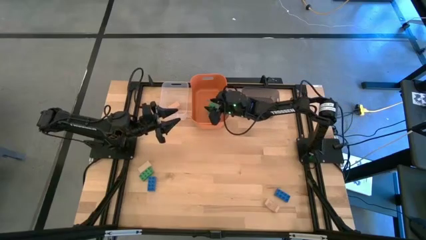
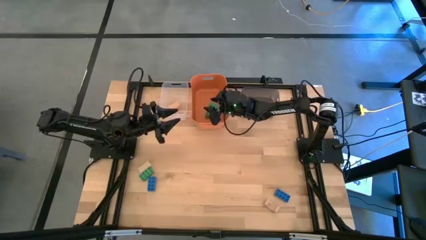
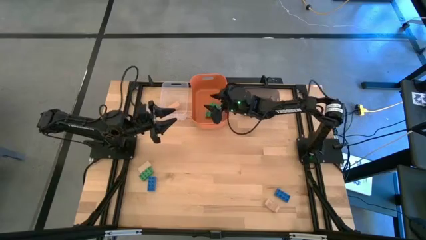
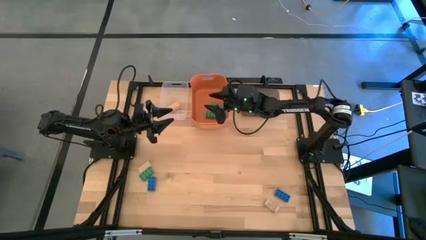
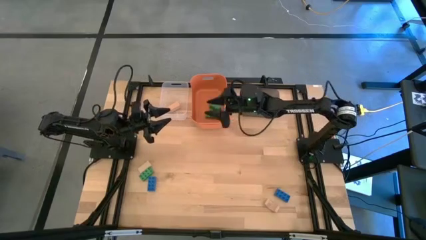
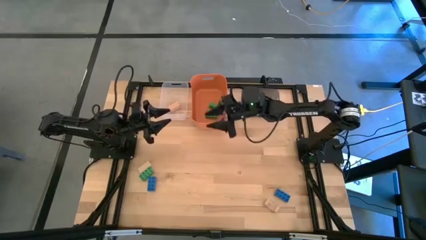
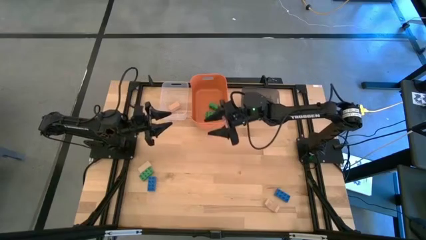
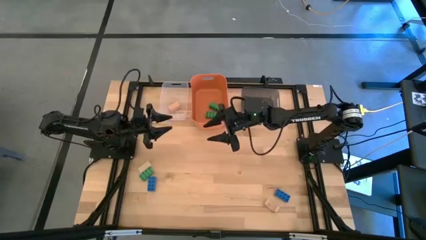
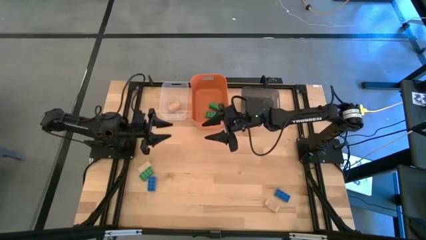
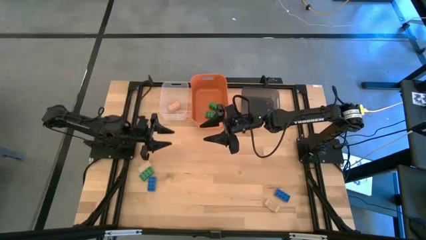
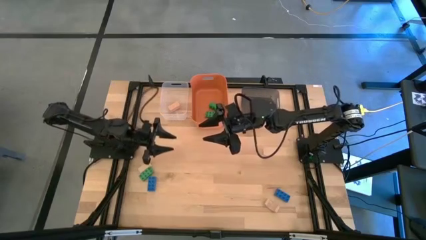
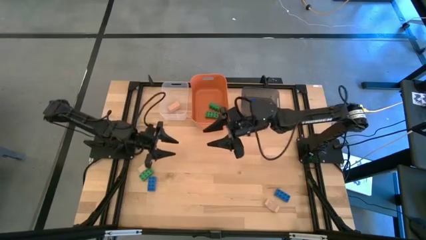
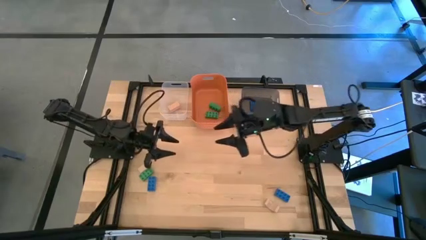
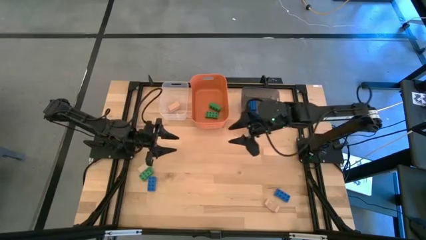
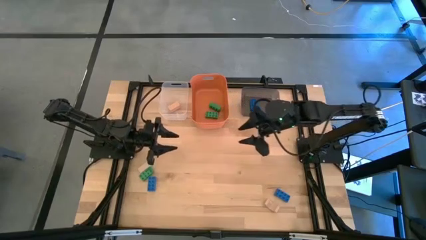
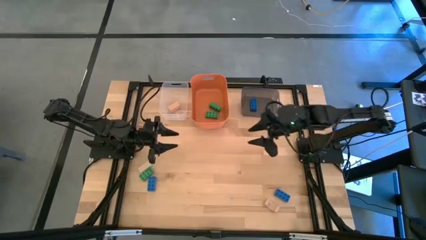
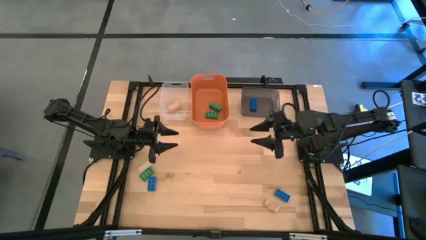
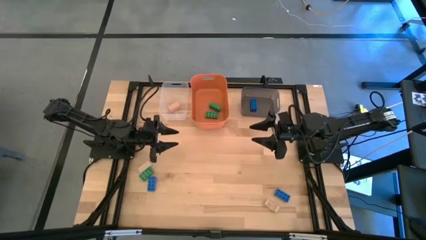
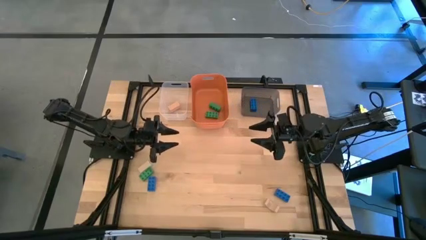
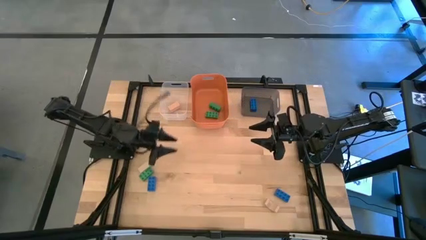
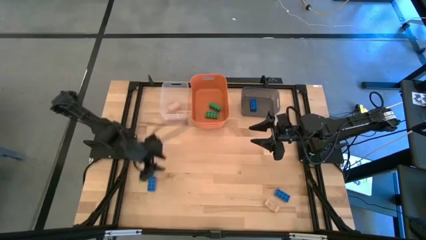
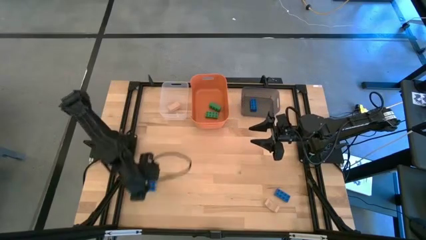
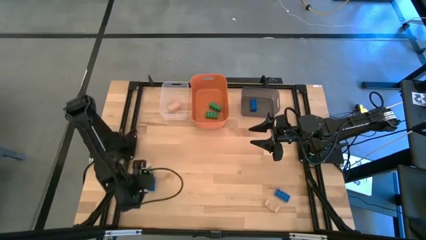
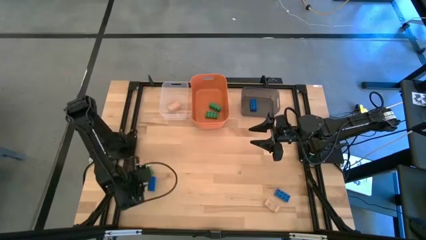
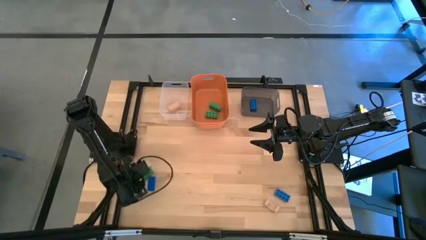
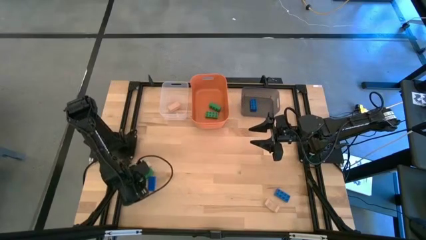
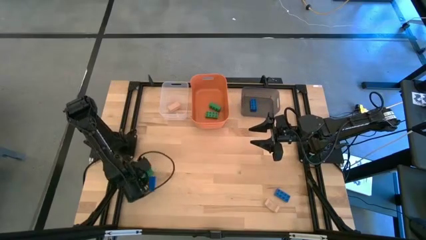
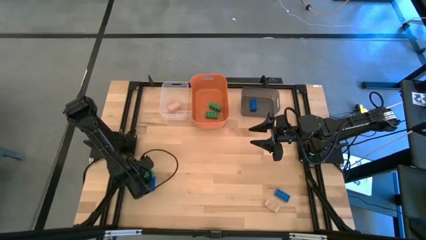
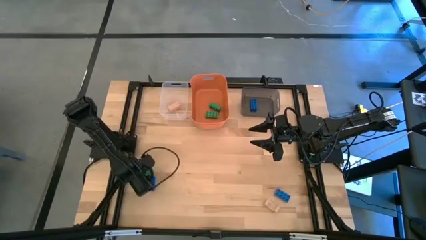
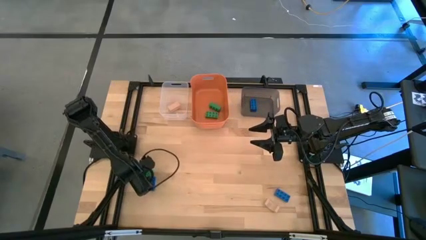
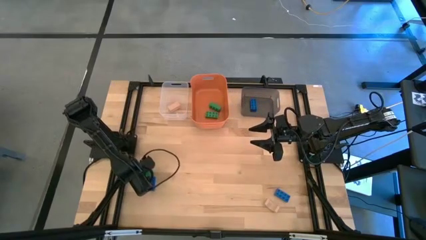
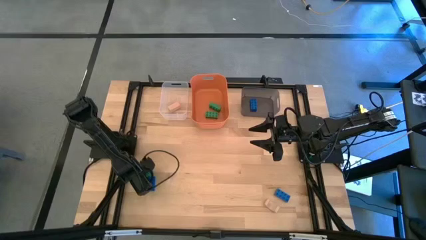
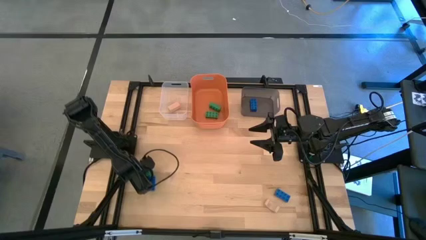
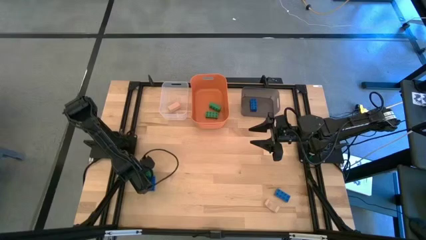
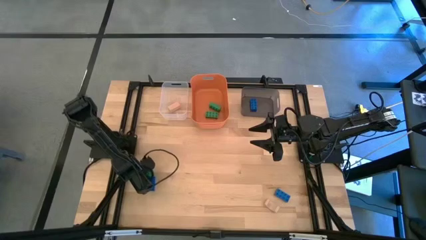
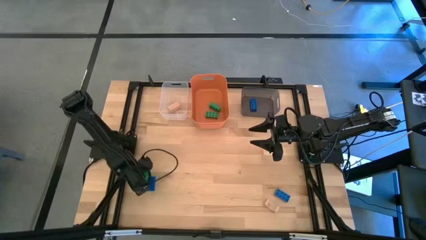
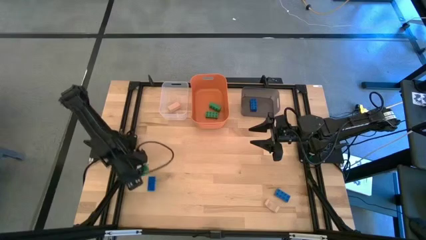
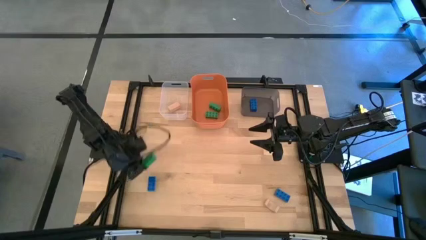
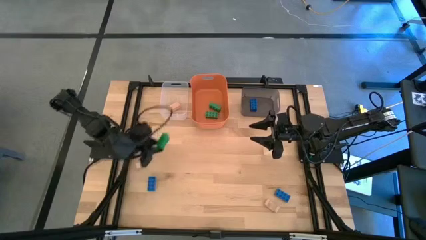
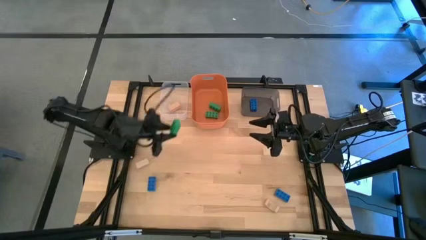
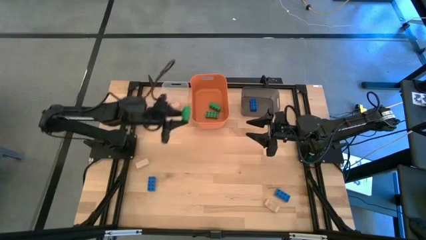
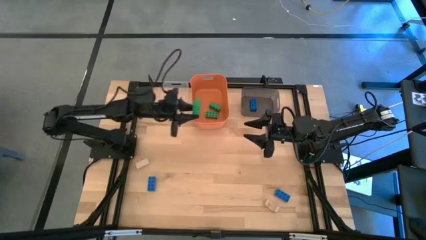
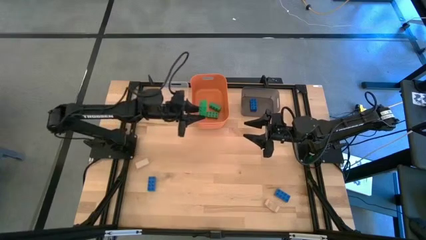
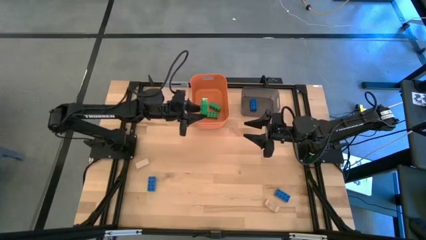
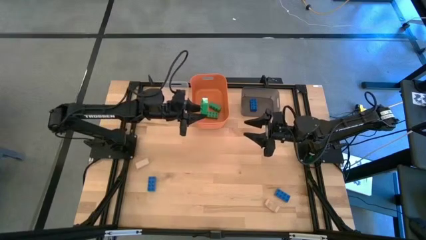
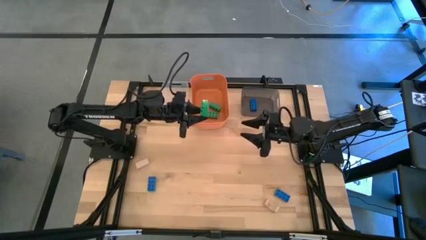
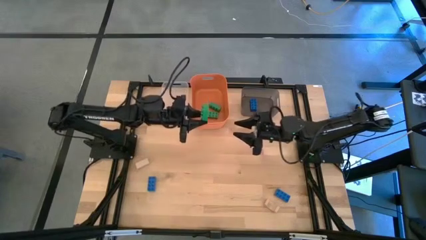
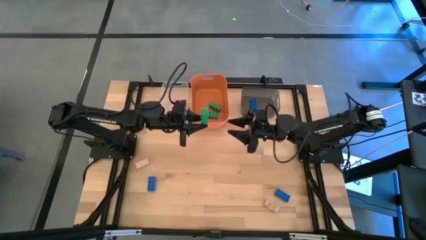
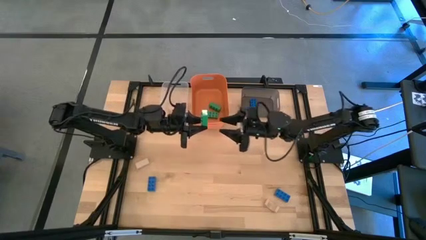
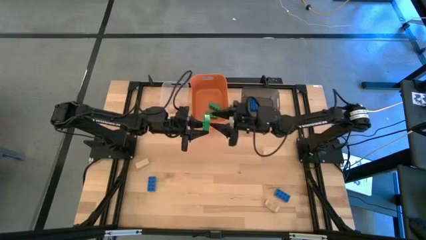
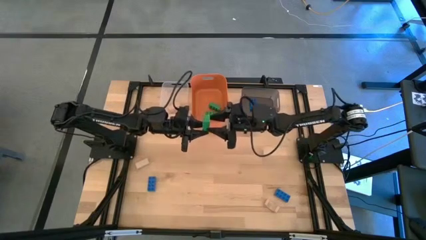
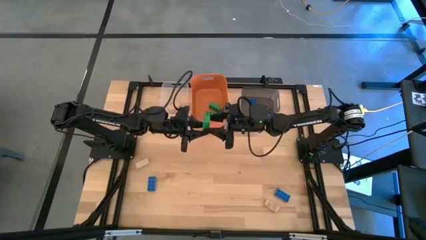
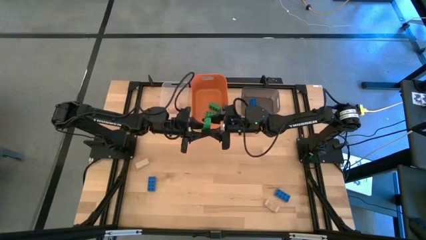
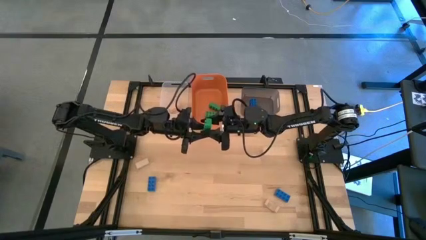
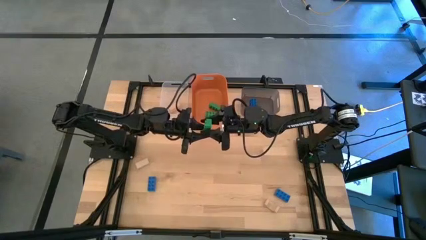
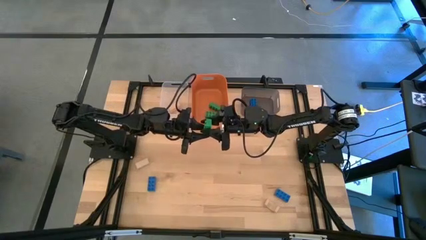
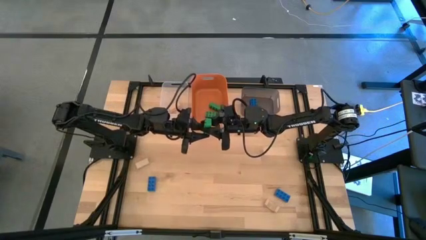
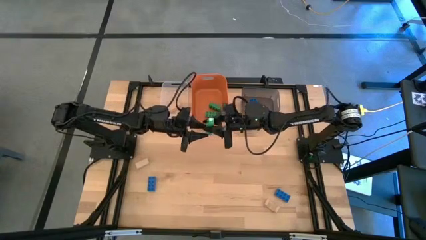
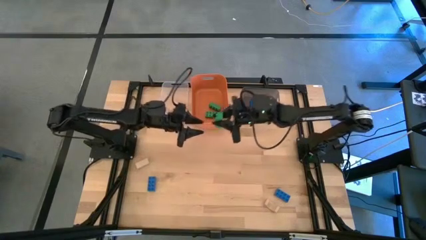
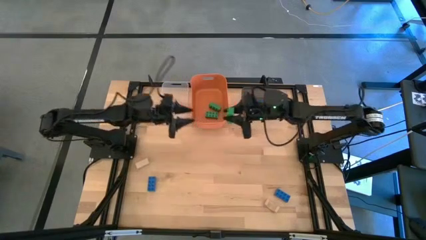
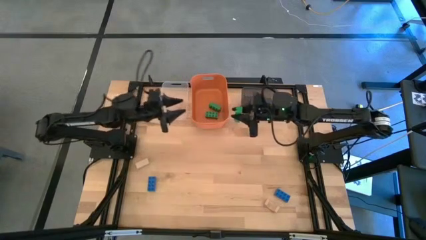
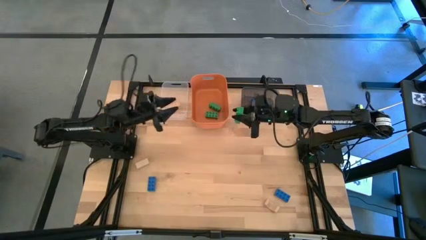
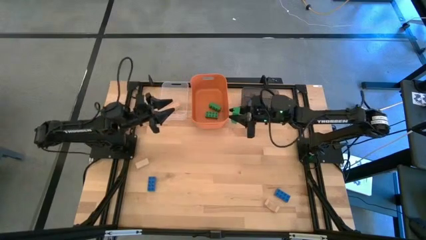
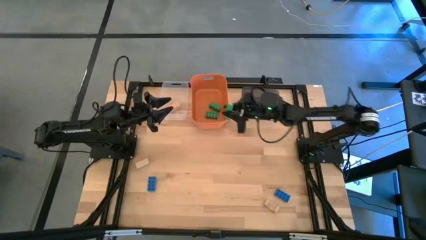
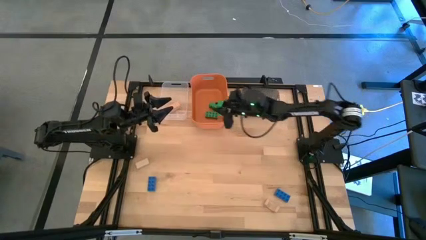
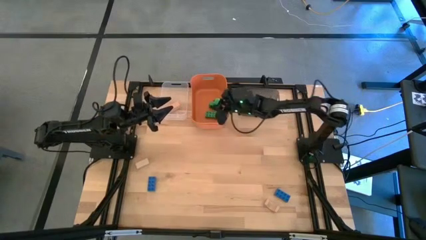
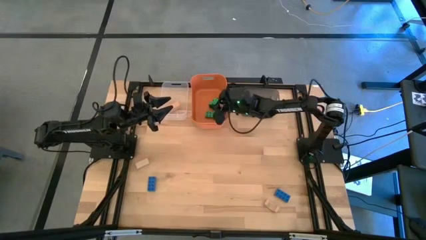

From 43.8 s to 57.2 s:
Task: Sort & place blocks by color
Put the green game piece into the orange bin

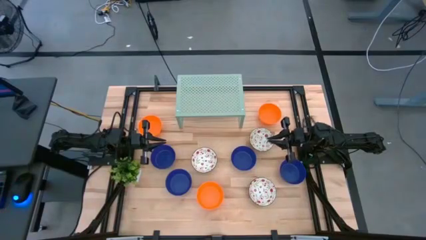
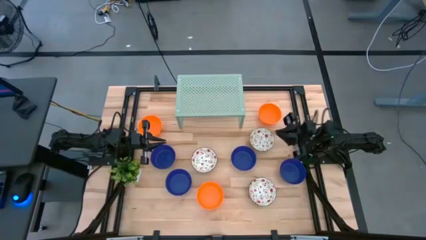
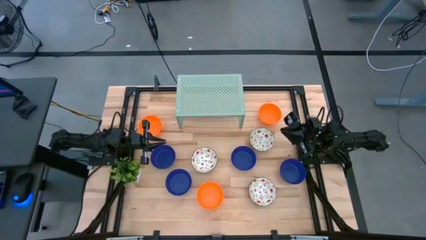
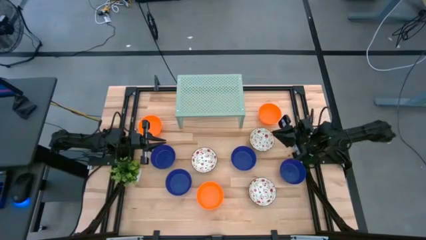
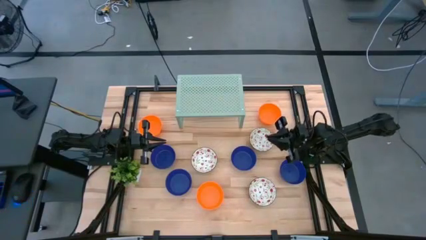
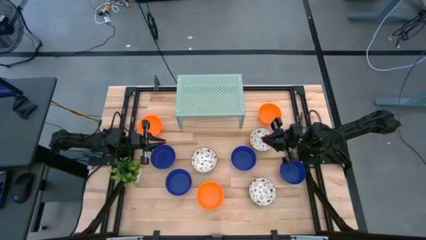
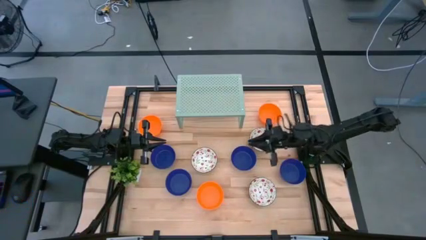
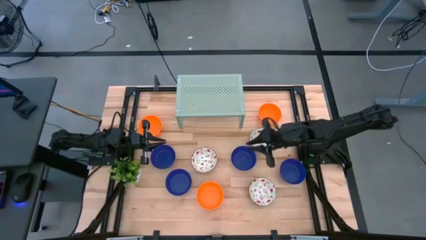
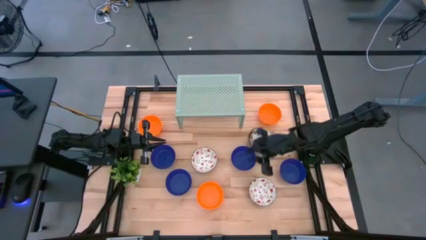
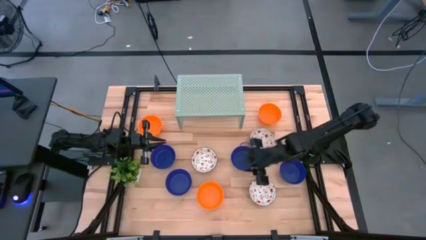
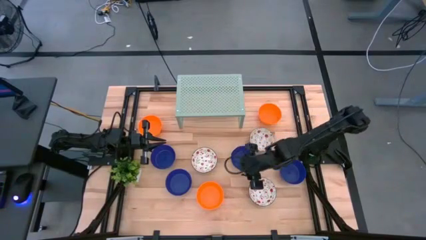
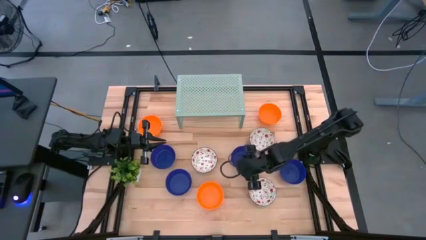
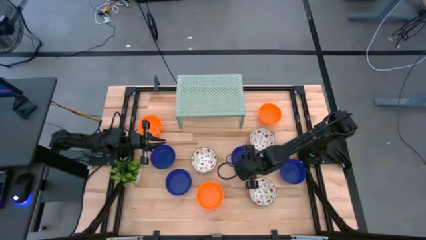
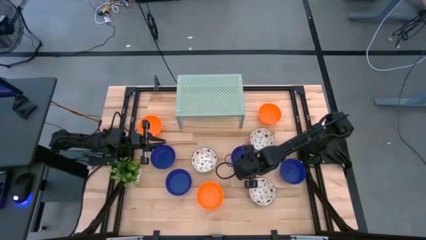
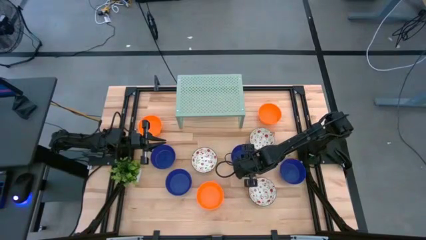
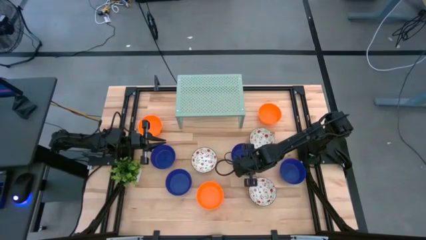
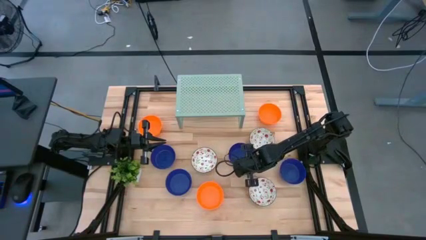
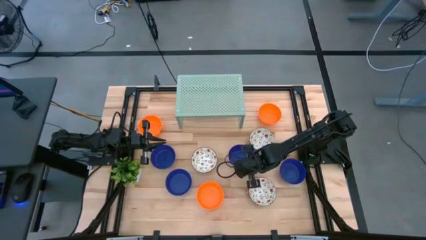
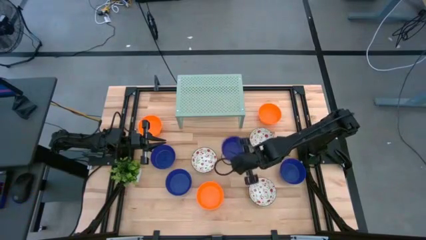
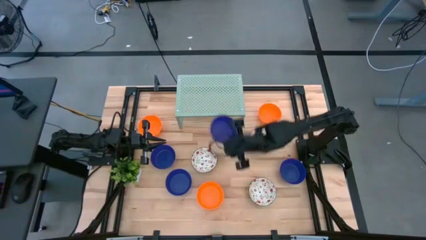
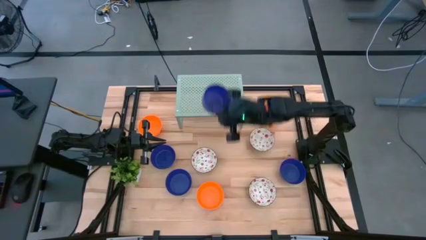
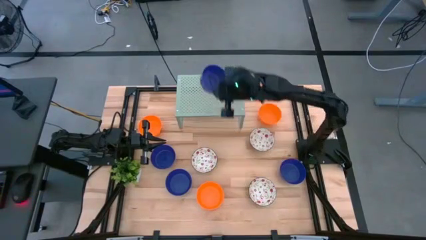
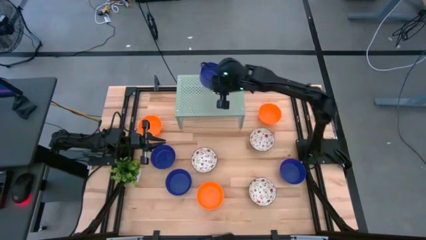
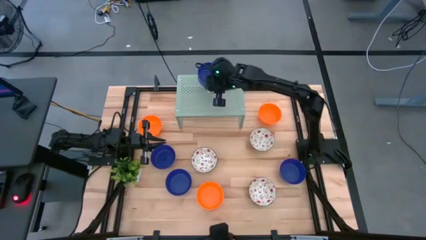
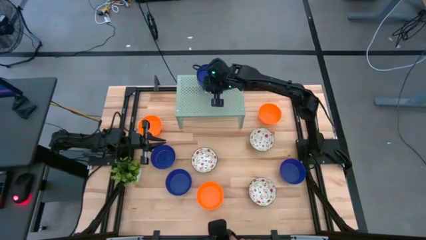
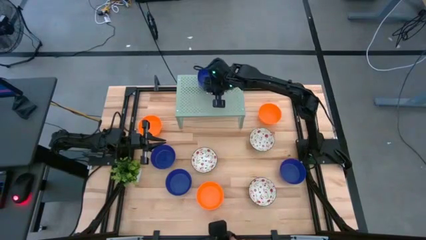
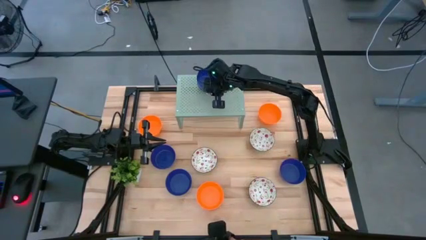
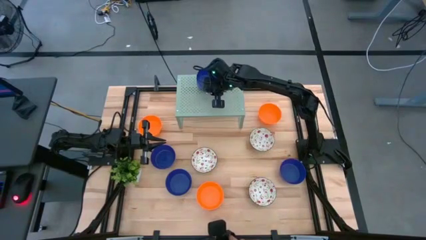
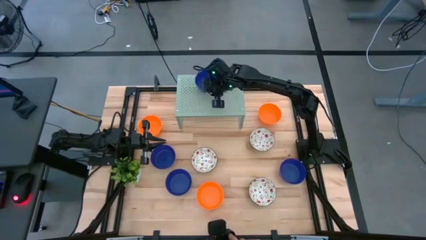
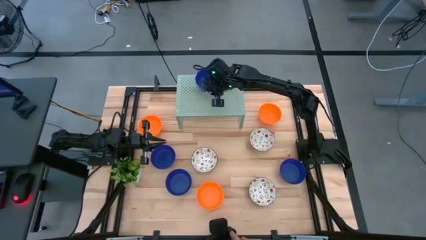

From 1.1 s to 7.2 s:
Task: Pick & Place Mini bowls
Put the blue bowl on the shelf
